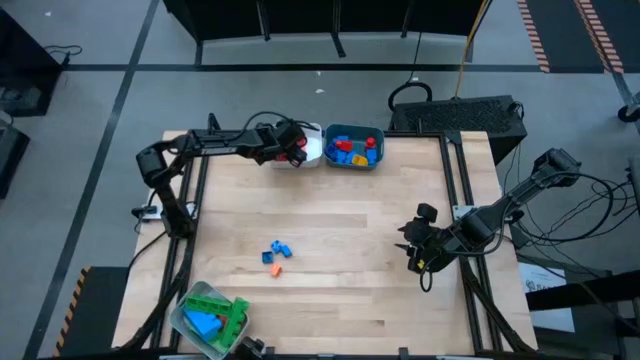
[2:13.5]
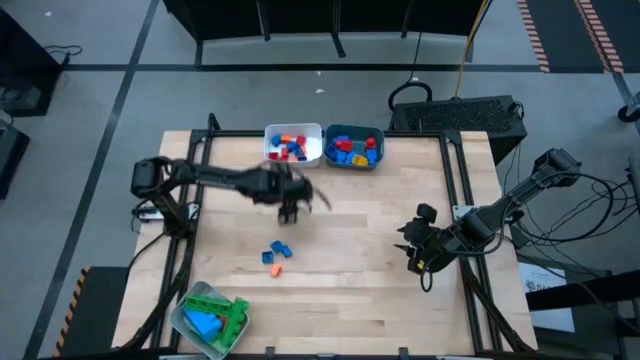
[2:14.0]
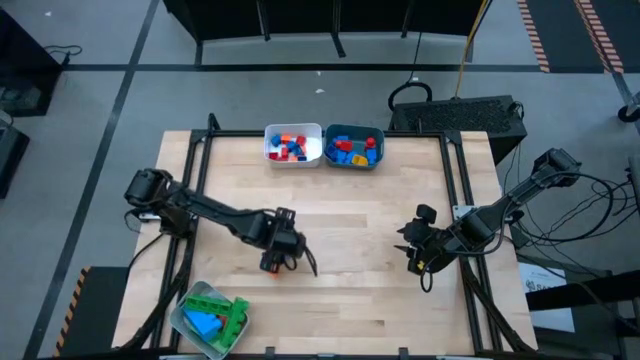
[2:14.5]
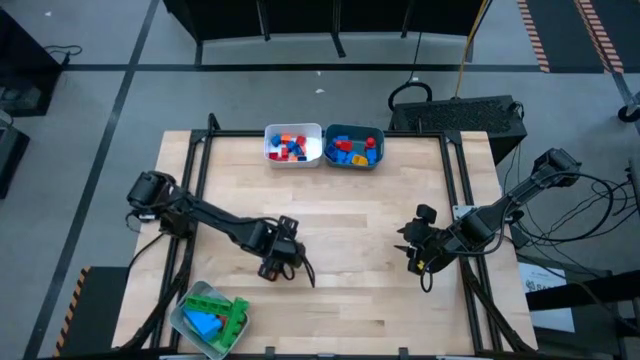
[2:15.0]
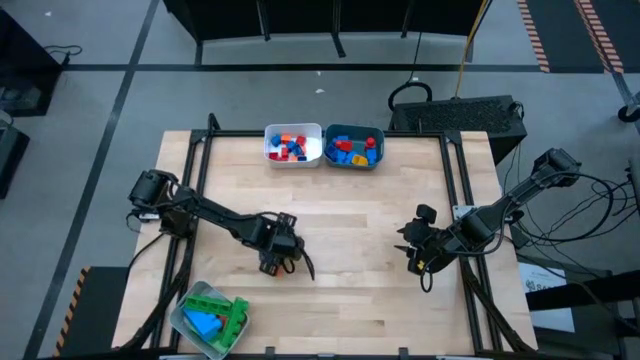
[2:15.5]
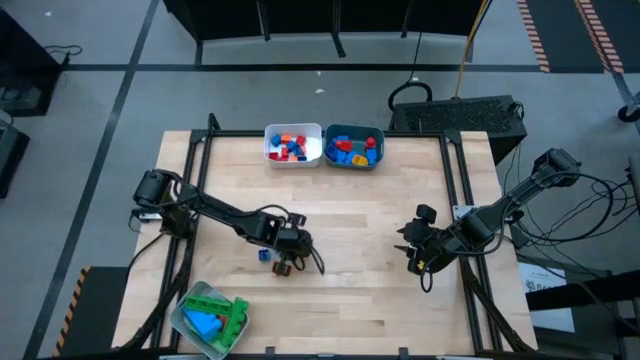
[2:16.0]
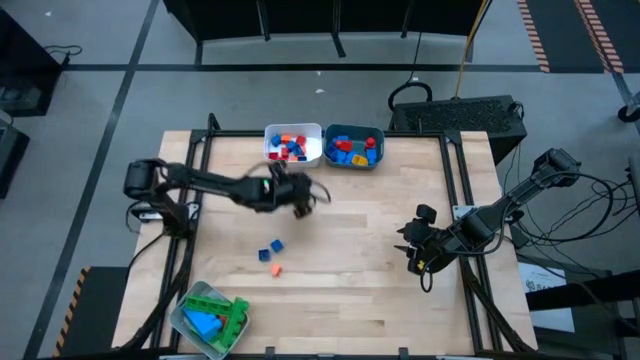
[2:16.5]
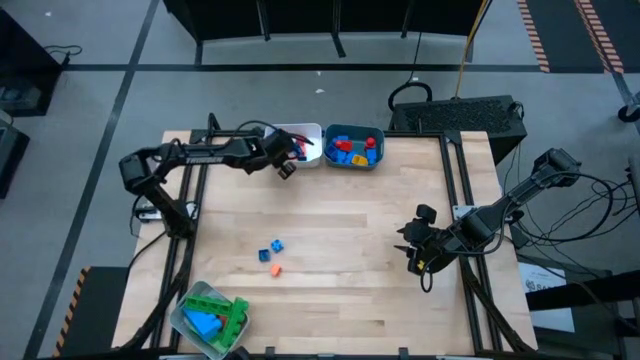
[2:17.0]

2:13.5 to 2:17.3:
Task: Sort blocks by size
Put the blue cube 4 stud game piece into the white bin

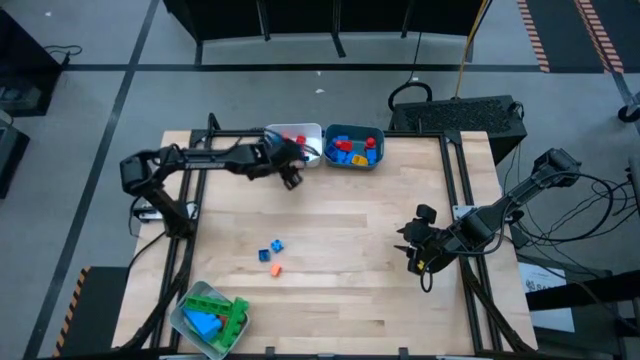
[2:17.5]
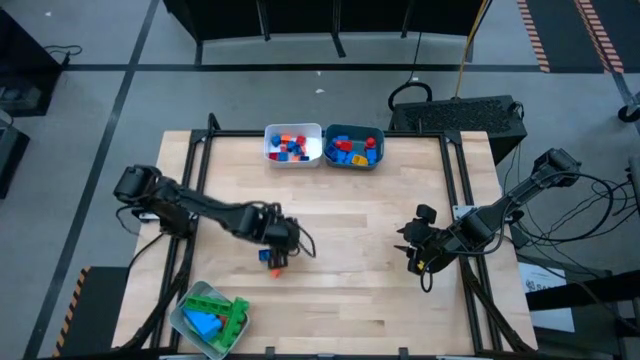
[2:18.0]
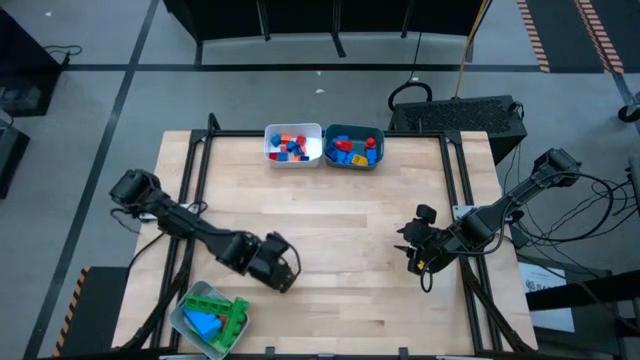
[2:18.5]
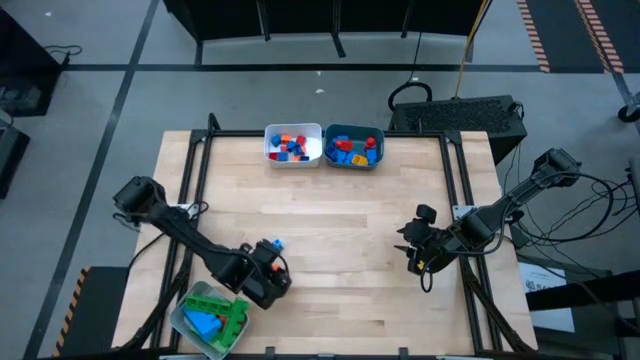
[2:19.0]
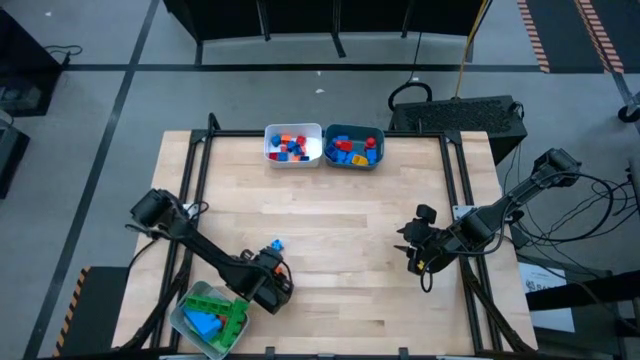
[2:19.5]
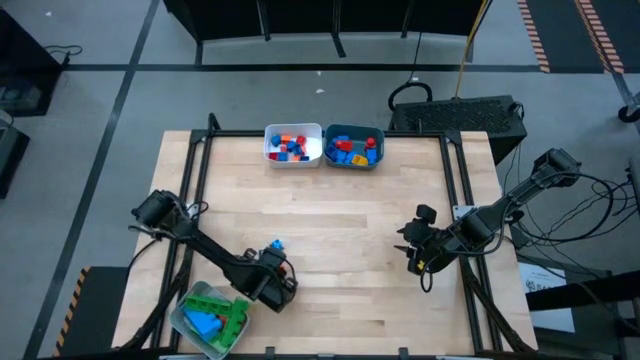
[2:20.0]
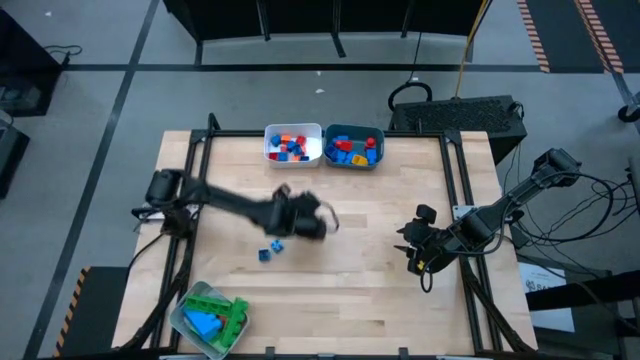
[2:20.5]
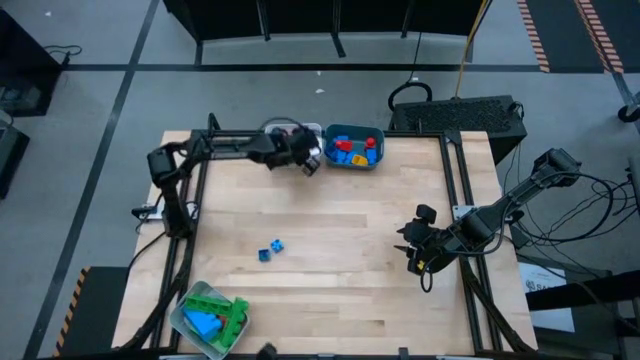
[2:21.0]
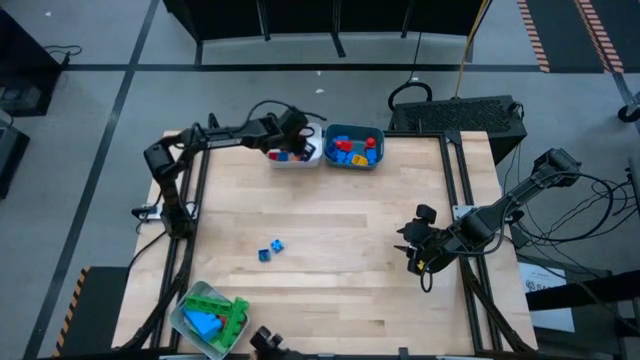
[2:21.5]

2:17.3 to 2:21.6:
Put the orange cube 4 stud game piece into the white bin

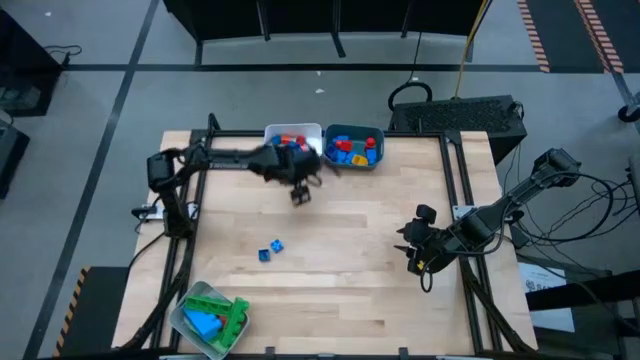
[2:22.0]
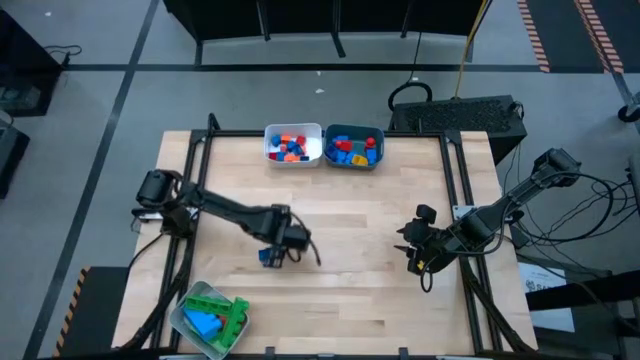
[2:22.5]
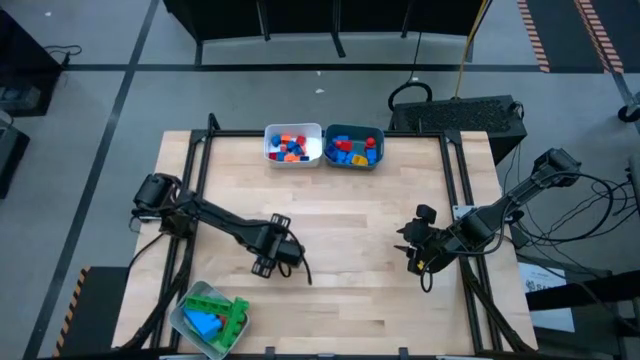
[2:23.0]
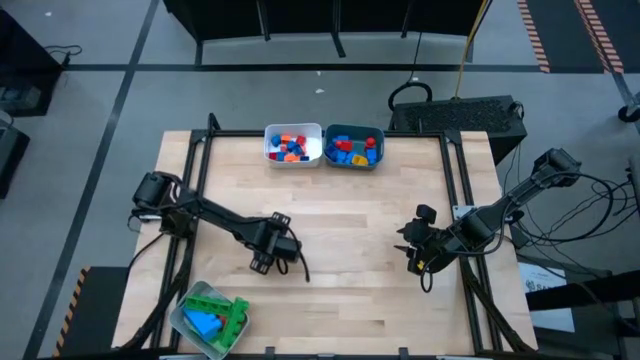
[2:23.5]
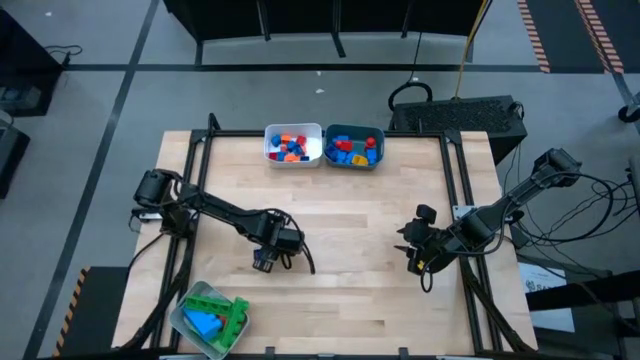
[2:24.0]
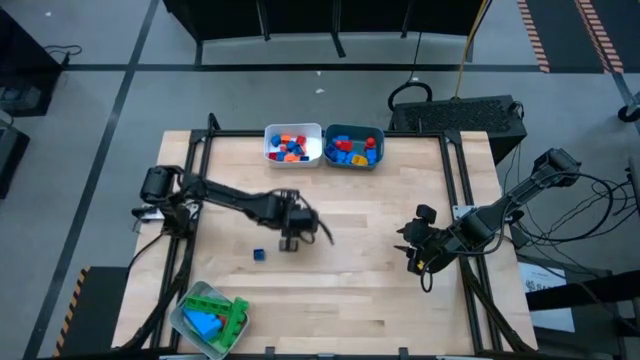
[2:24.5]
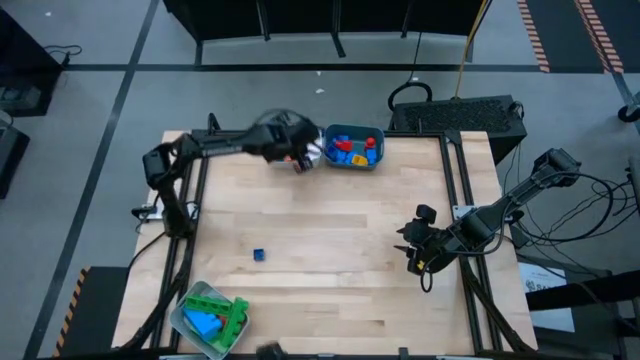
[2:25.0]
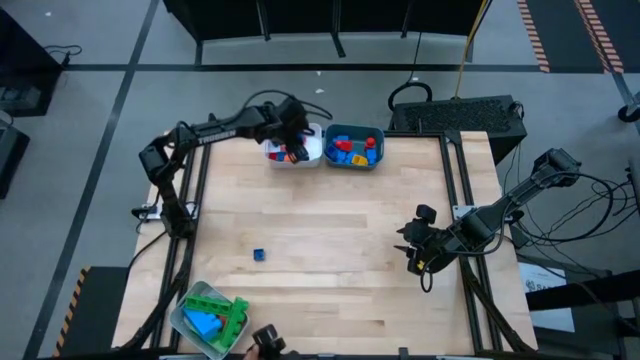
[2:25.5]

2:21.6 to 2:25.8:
Put the blue cube 4 stud game piece into the white bin

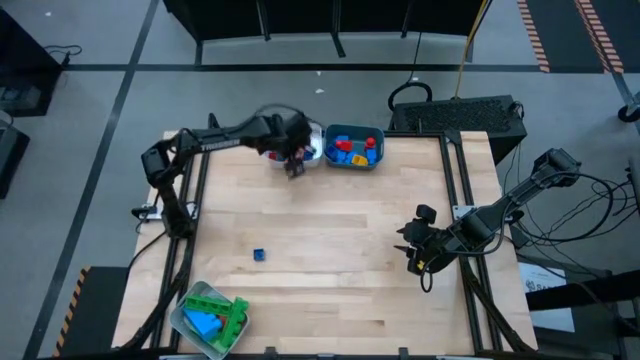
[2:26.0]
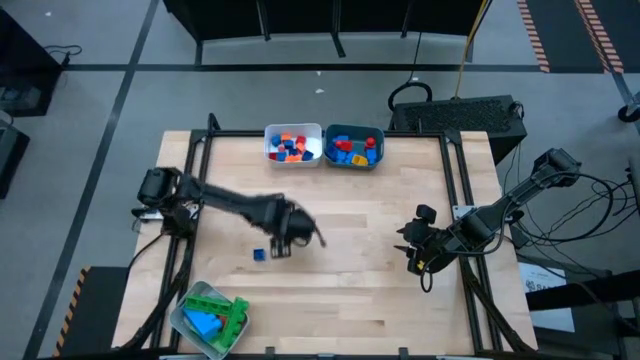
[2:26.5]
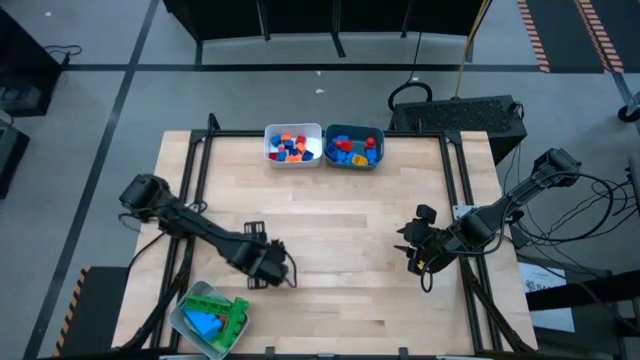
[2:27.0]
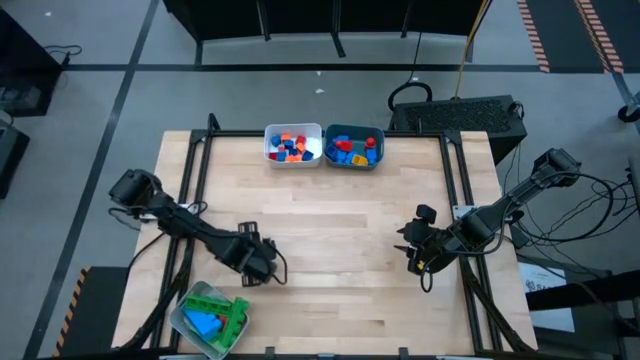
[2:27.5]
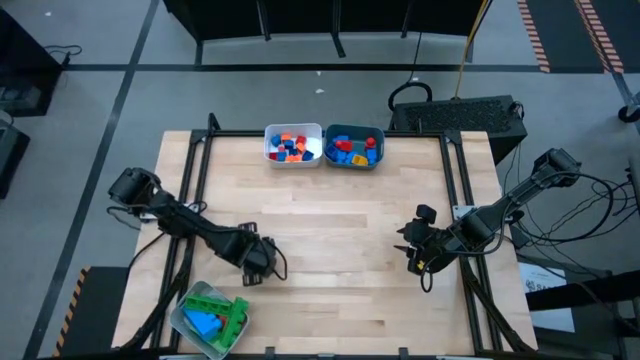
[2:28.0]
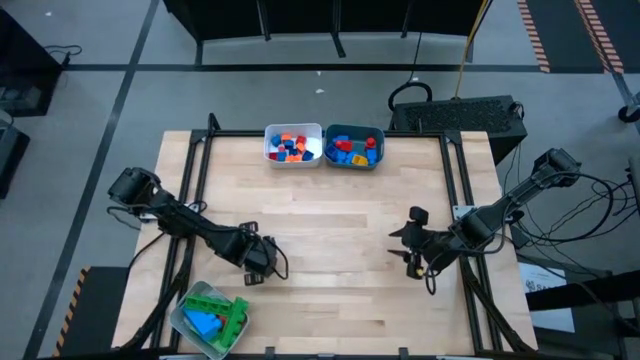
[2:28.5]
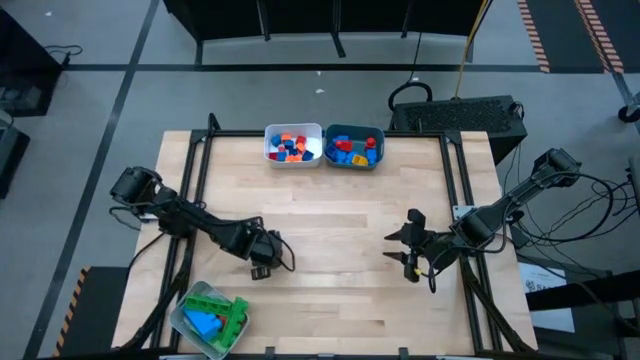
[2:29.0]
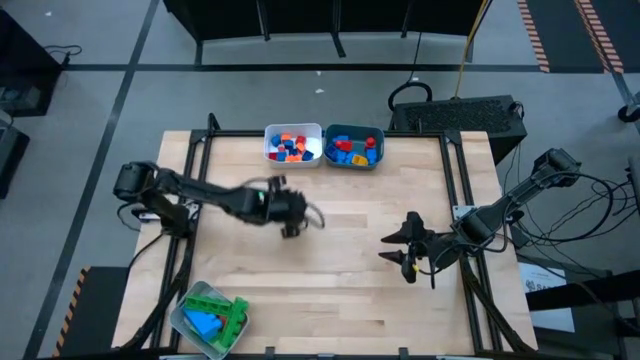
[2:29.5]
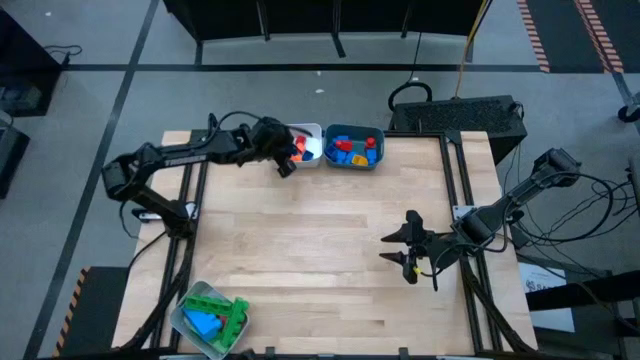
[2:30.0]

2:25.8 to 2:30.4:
Put the blue cube 4 stud game piece into the white bin

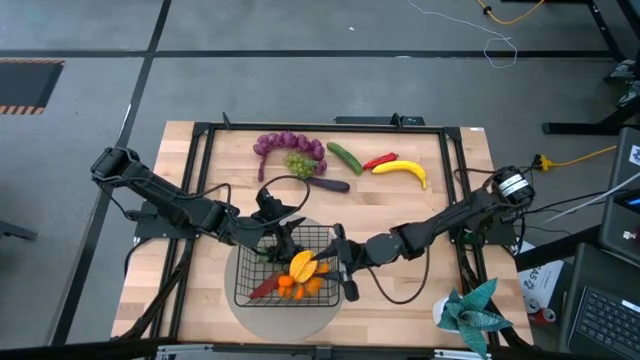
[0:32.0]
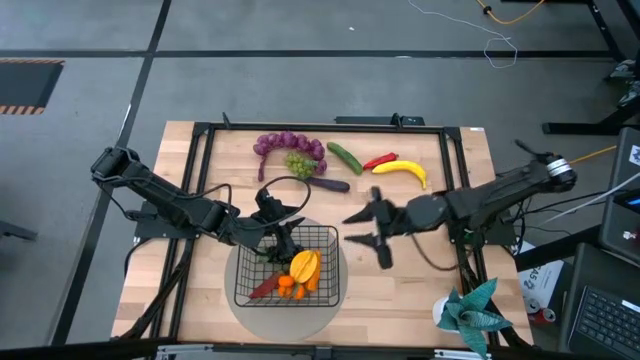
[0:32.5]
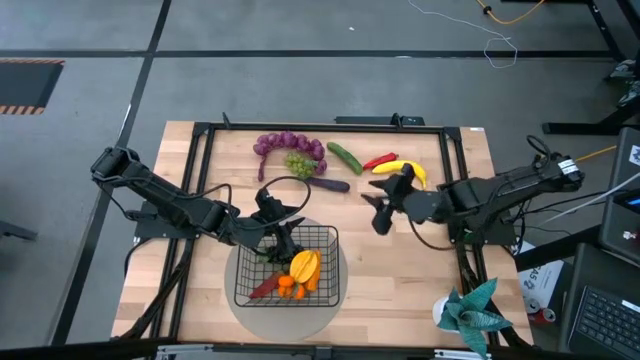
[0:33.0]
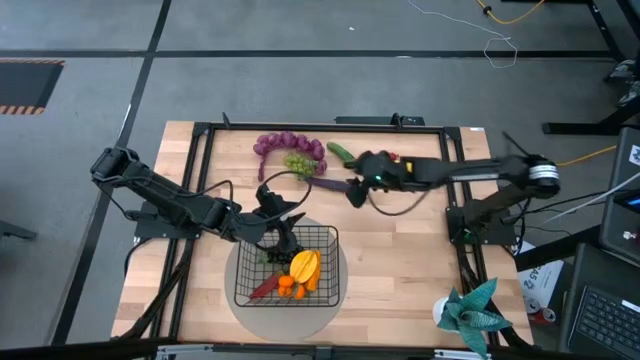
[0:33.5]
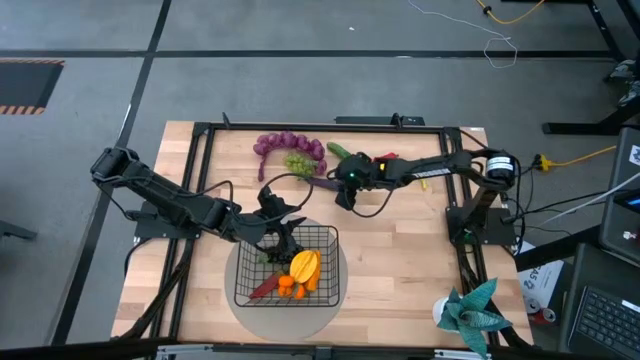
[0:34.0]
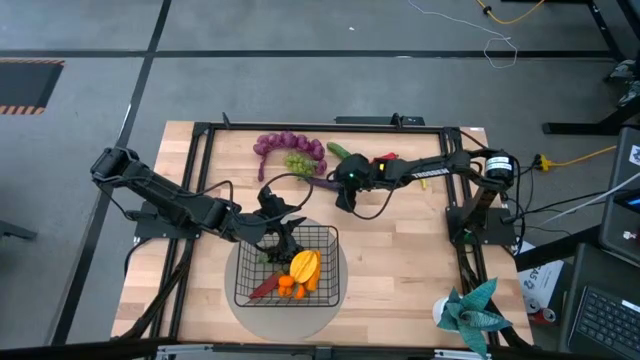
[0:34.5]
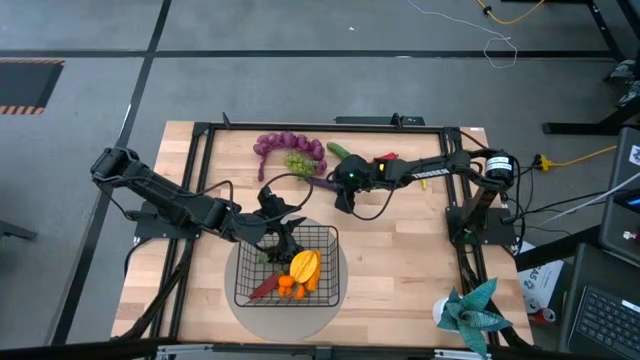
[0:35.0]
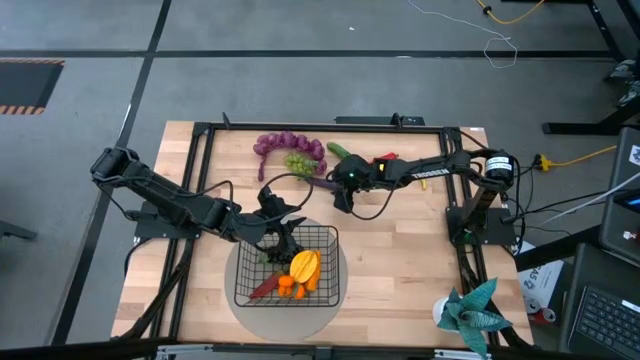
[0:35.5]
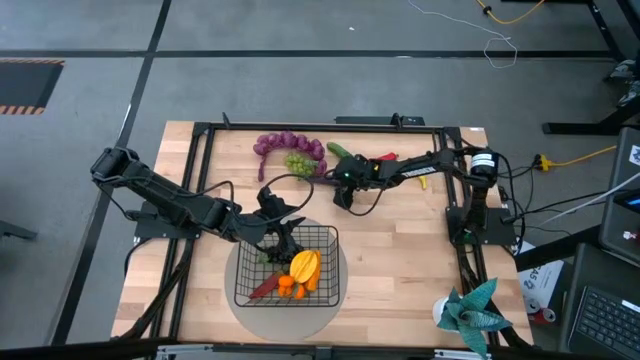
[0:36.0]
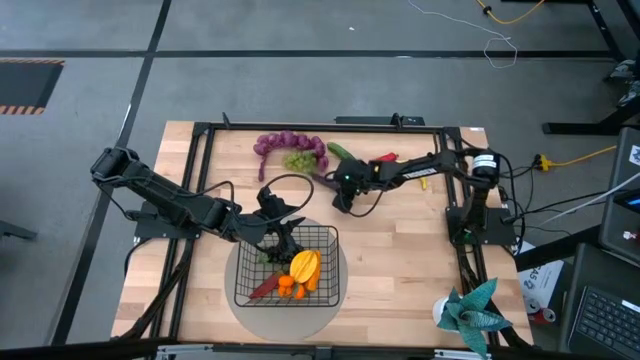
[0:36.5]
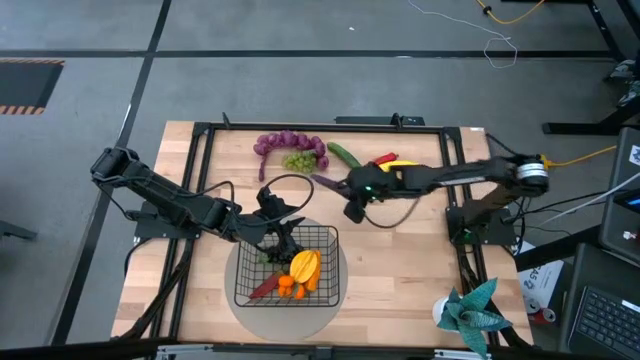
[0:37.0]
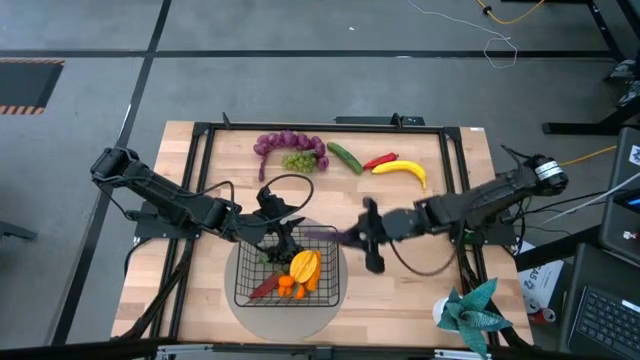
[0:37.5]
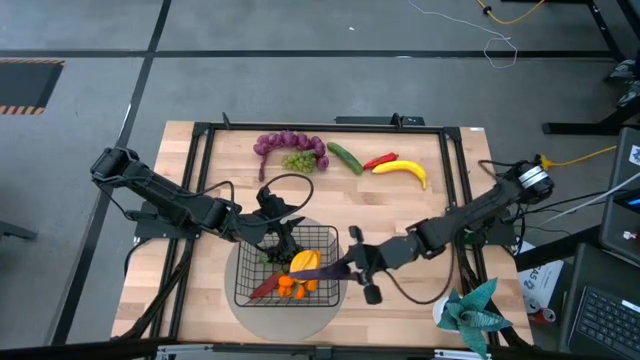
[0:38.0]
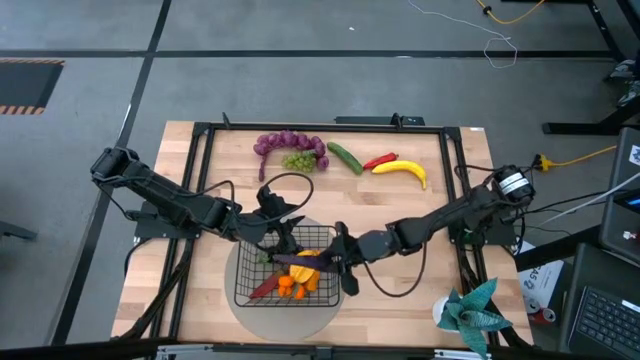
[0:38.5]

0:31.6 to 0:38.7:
Task: Build produce basket
Put the eggplant into the black wire basket
